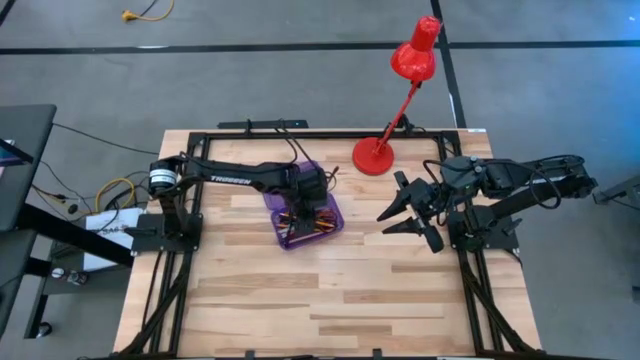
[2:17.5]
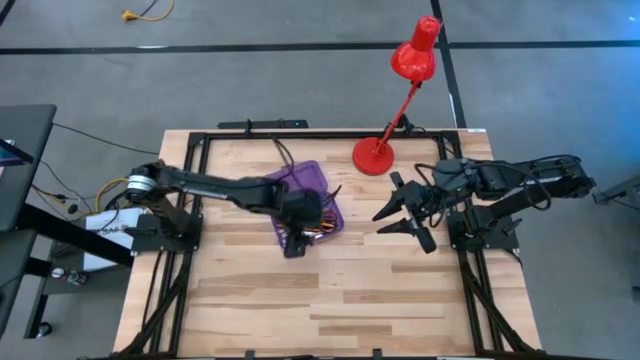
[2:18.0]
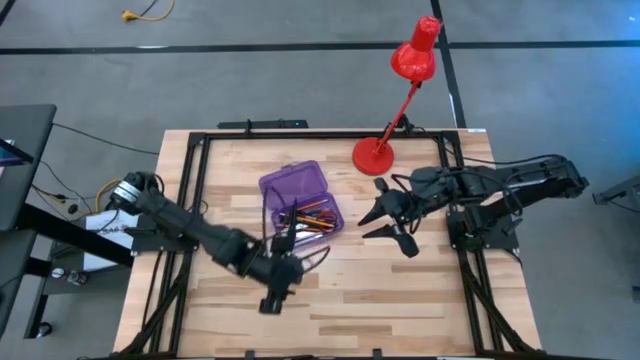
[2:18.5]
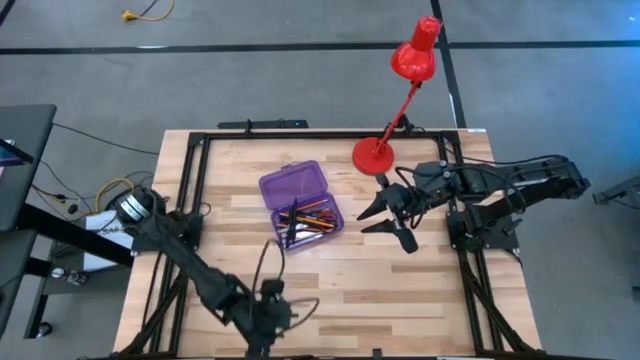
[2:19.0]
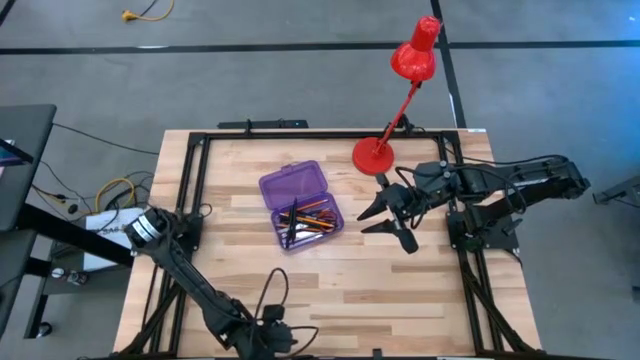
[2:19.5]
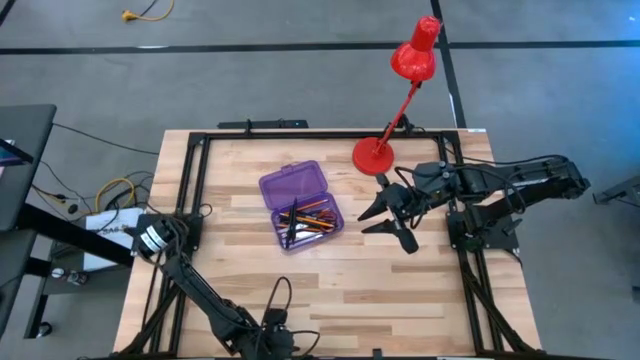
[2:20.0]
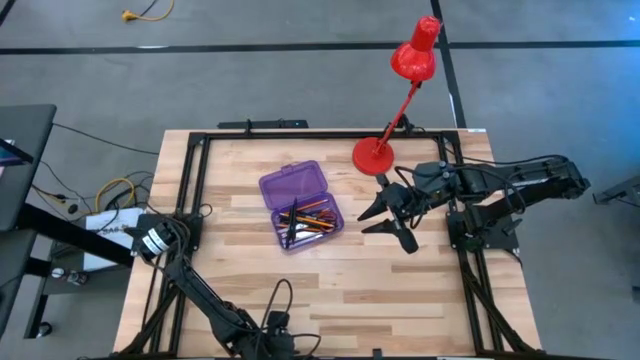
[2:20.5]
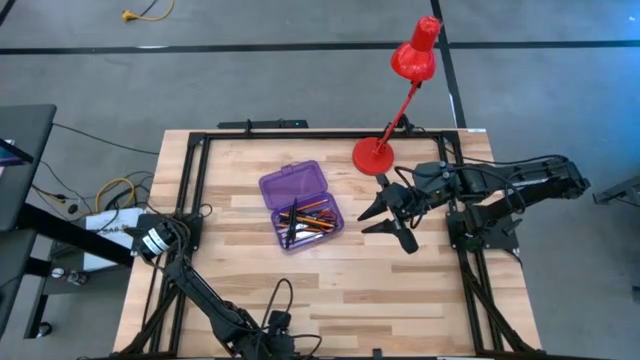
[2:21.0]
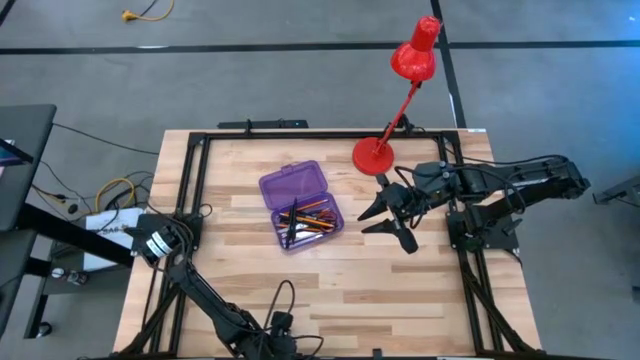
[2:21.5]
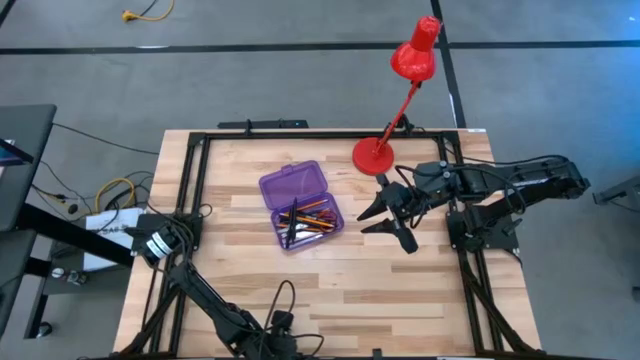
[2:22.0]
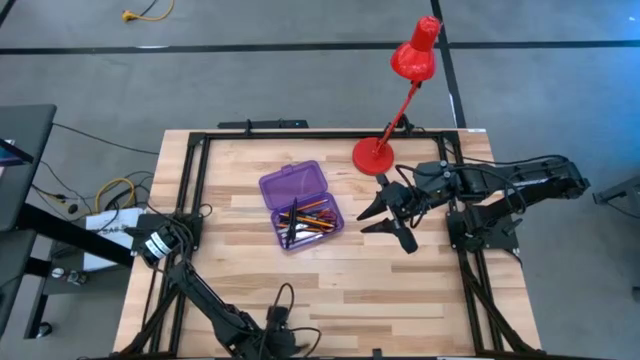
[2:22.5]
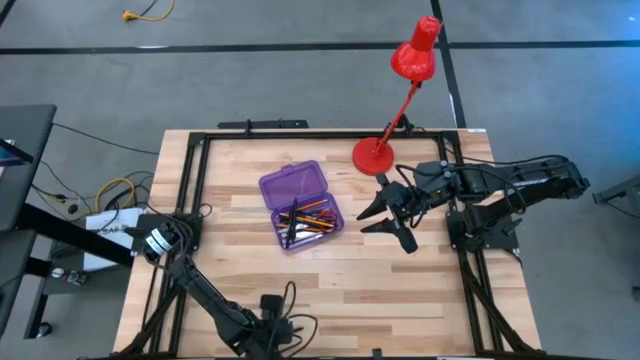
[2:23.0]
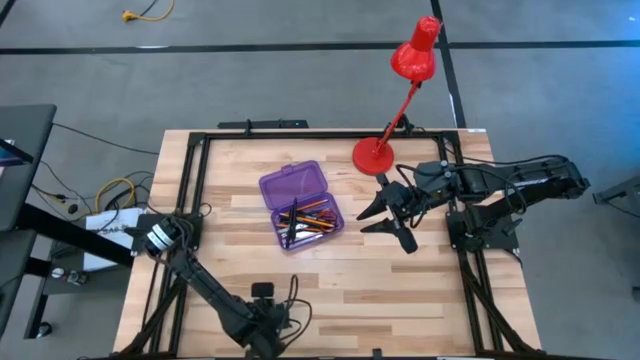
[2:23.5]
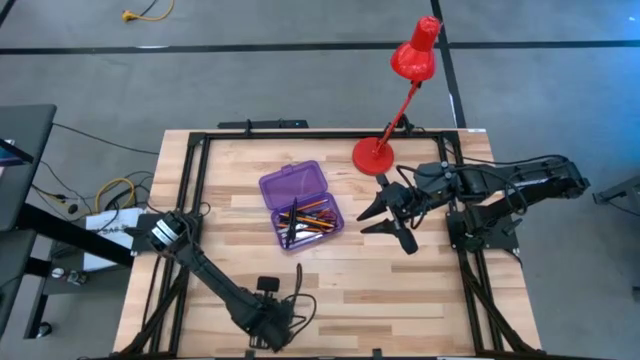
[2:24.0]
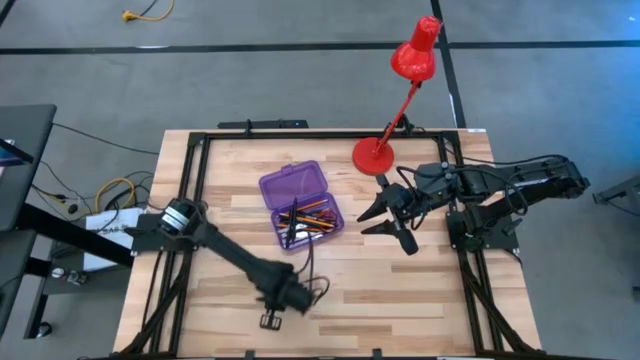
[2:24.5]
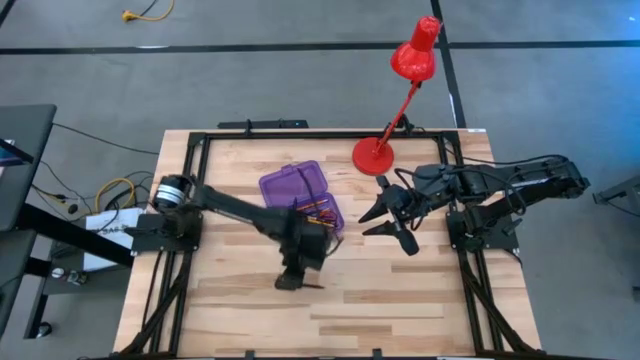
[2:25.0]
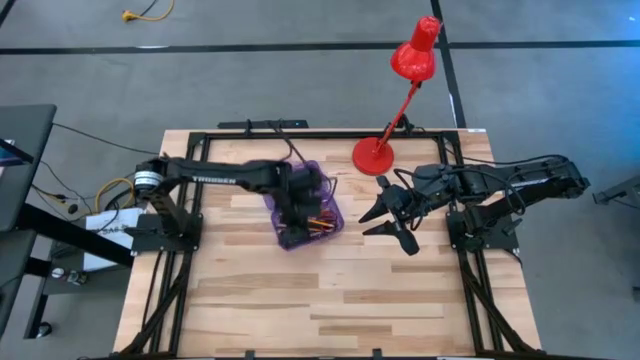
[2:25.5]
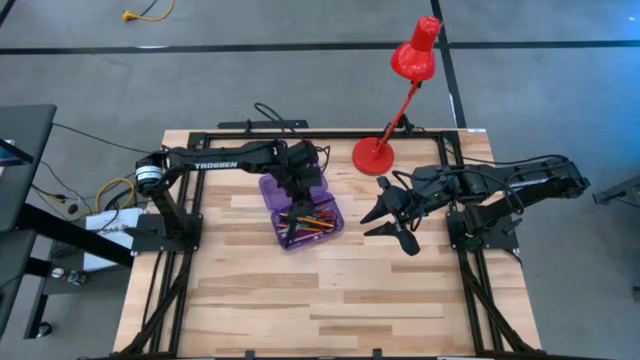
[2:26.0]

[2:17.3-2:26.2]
Task: Pick & place school supplies into a supply box
Put the black pen into the purple supply box

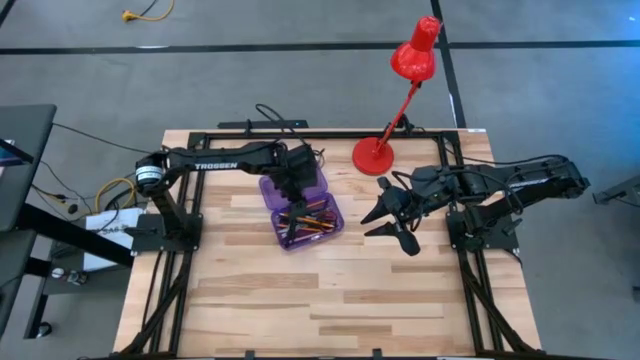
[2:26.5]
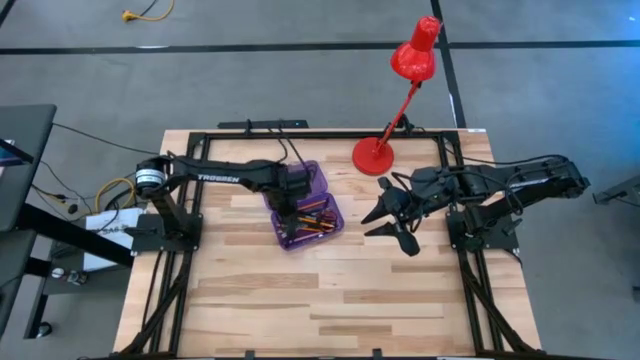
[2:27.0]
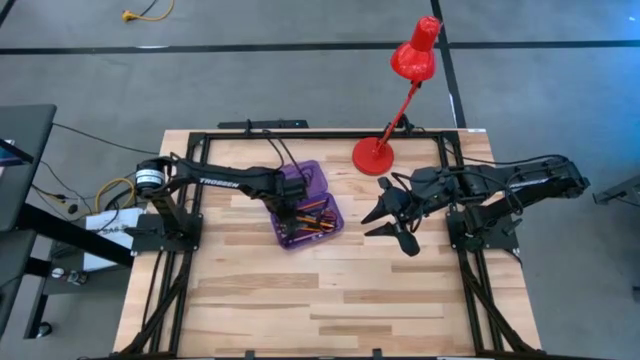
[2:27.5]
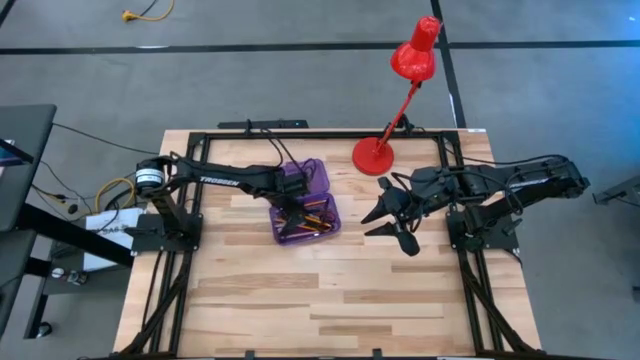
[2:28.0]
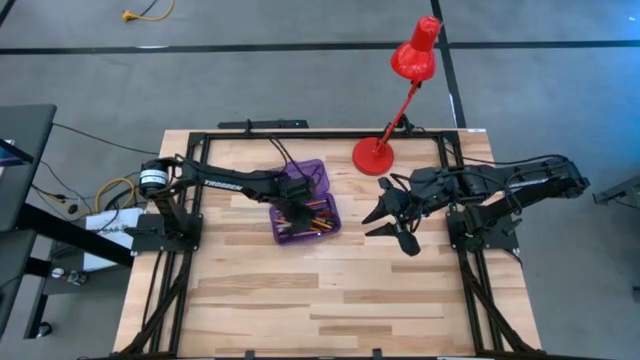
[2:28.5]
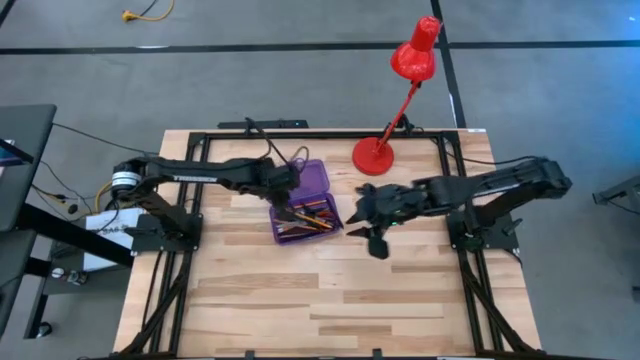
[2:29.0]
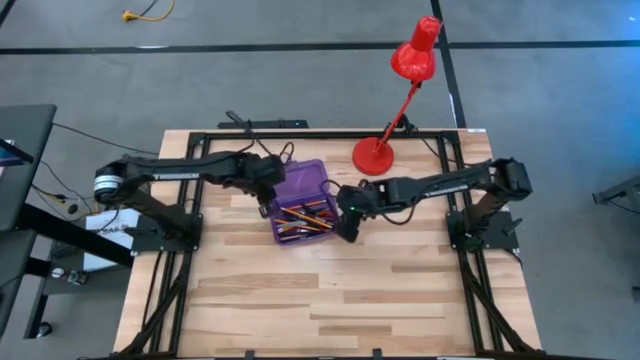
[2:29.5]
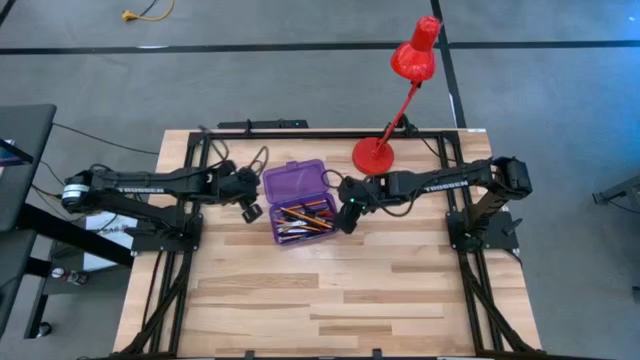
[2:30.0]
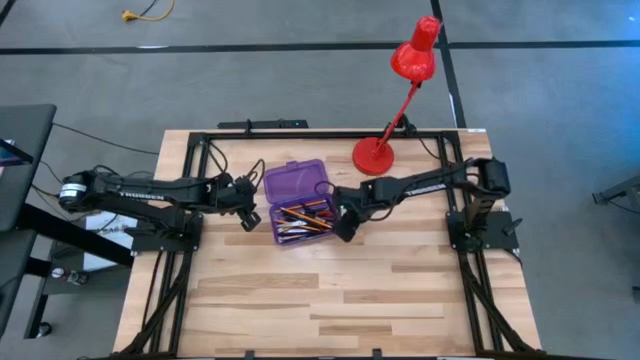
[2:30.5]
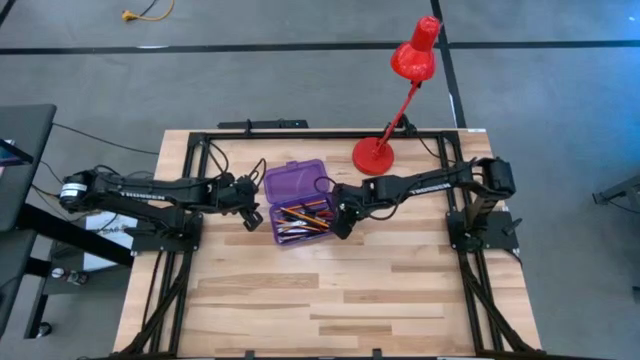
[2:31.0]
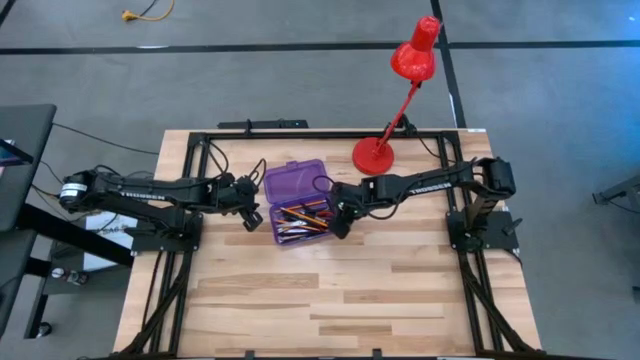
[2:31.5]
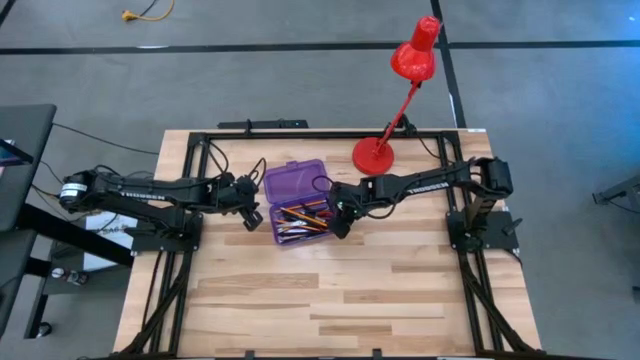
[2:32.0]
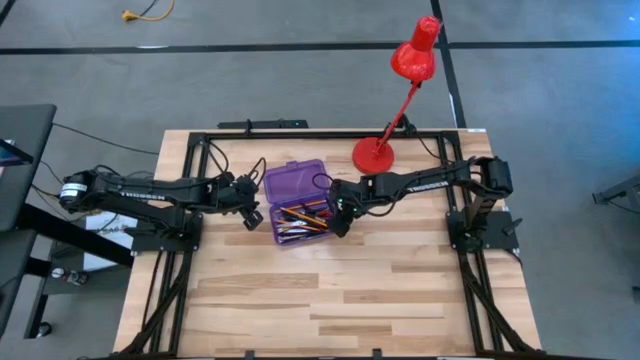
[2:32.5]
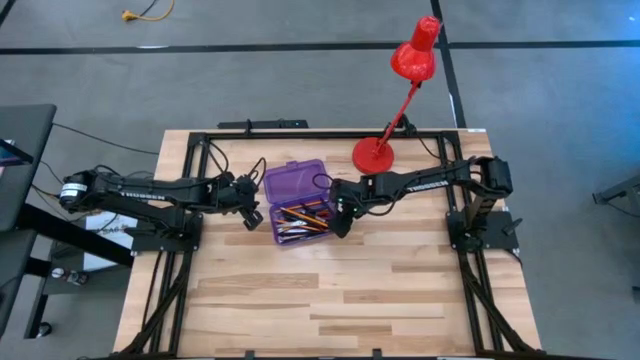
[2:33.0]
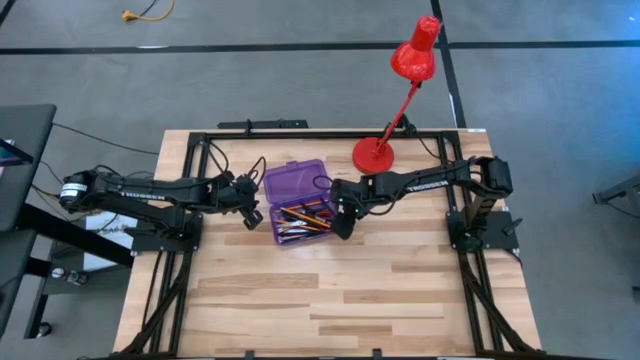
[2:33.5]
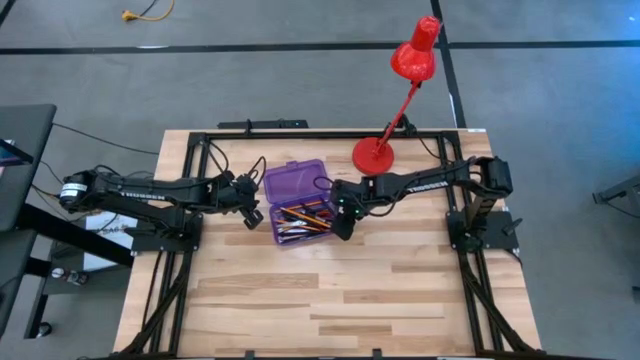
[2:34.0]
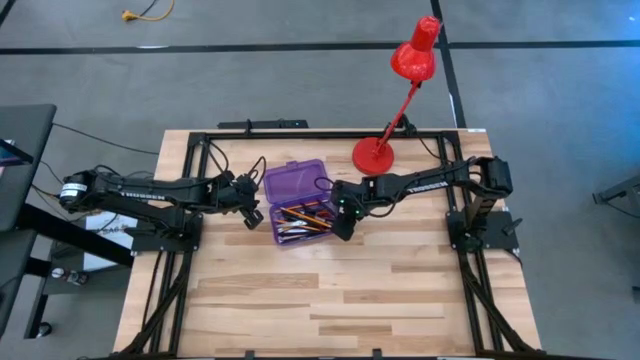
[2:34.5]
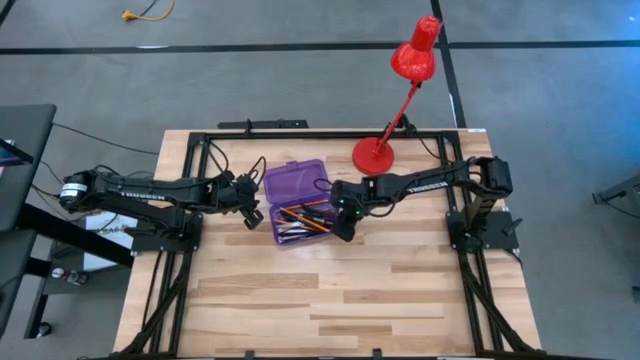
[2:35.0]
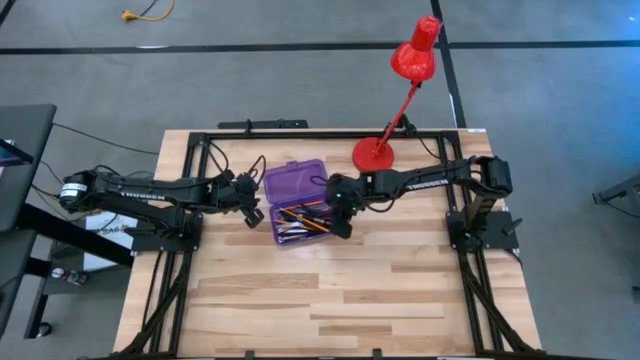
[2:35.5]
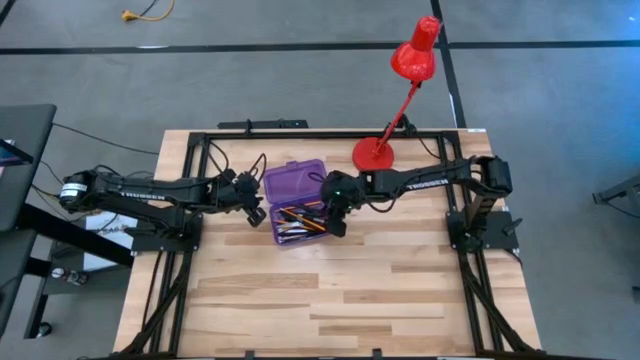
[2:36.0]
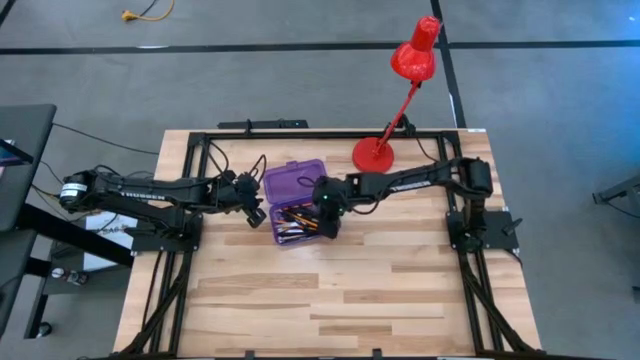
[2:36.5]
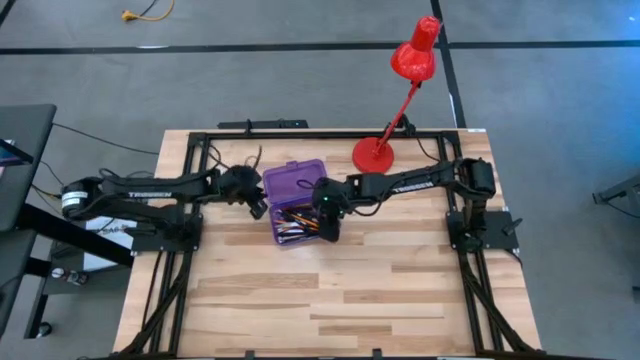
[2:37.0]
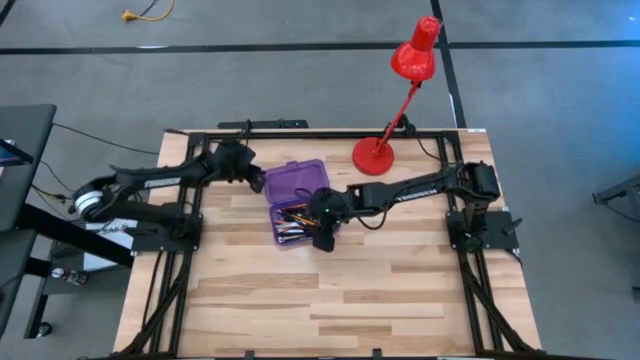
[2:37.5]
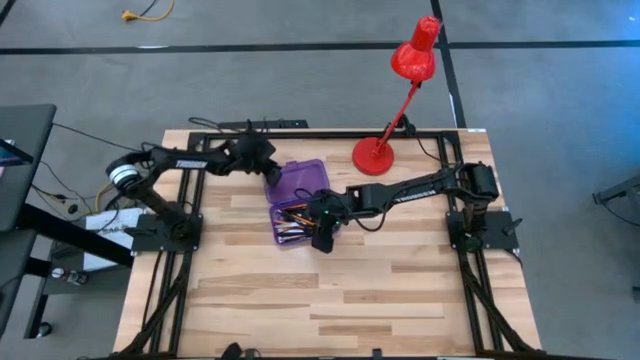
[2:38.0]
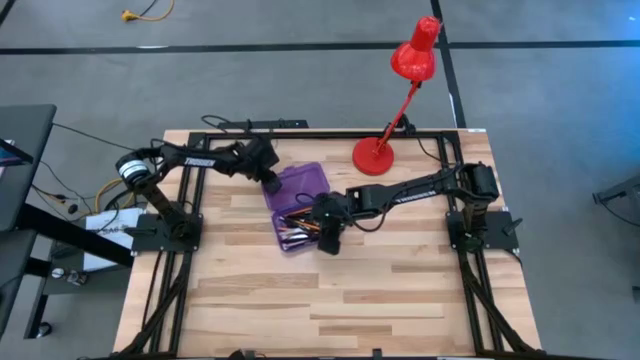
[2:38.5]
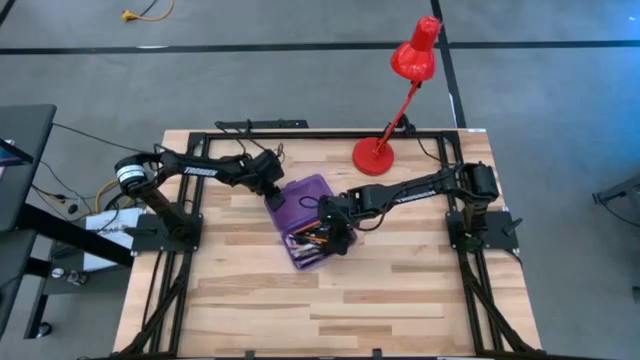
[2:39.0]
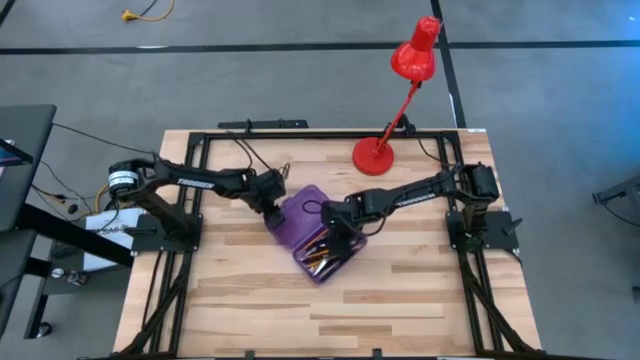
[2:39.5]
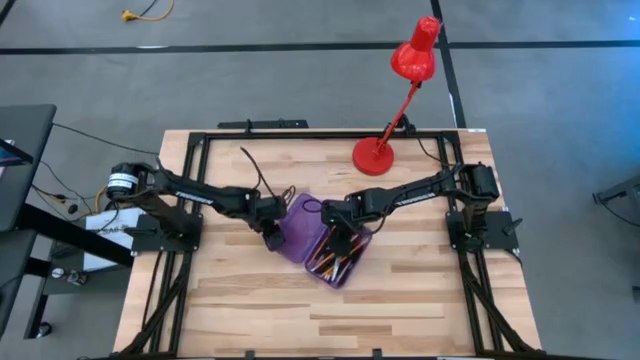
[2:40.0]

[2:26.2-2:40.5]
Adjust the school supplies in the purple supply box
